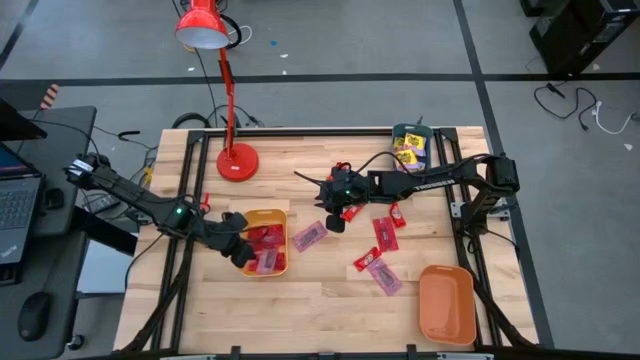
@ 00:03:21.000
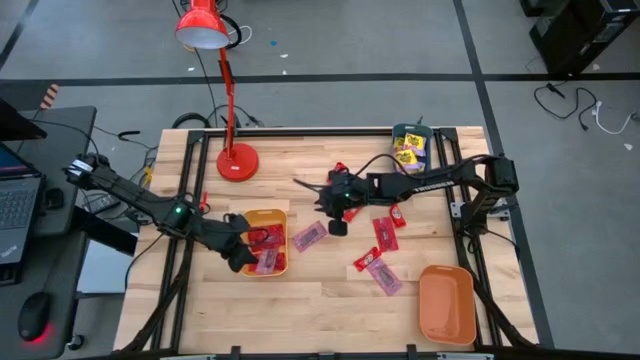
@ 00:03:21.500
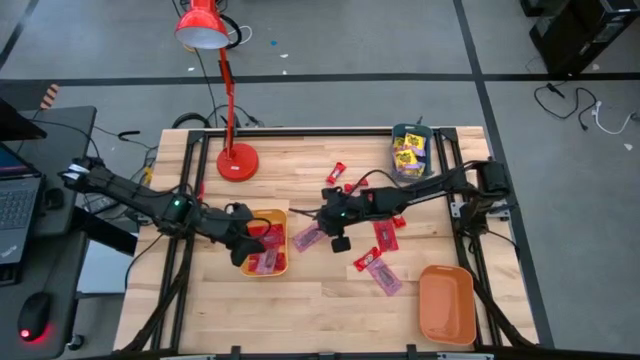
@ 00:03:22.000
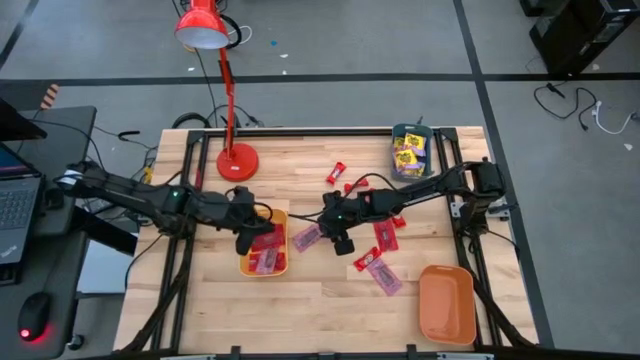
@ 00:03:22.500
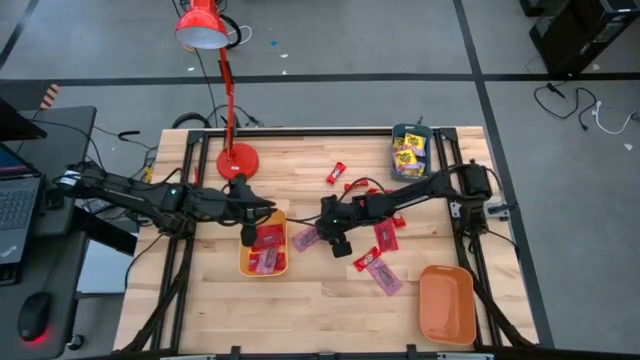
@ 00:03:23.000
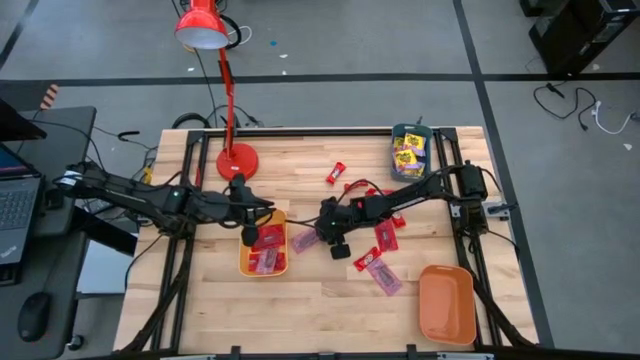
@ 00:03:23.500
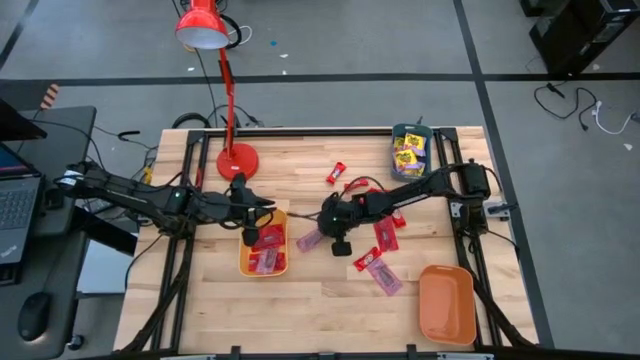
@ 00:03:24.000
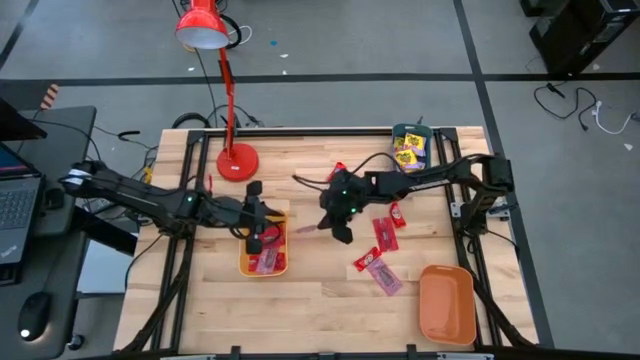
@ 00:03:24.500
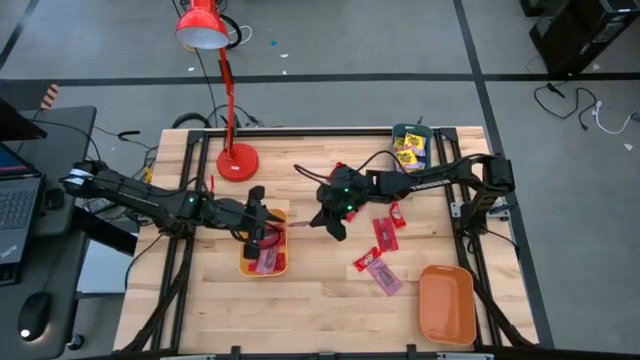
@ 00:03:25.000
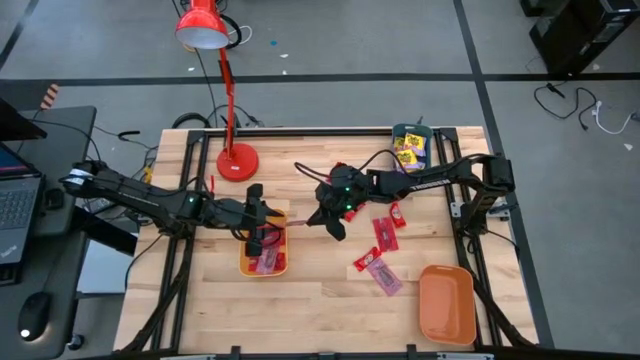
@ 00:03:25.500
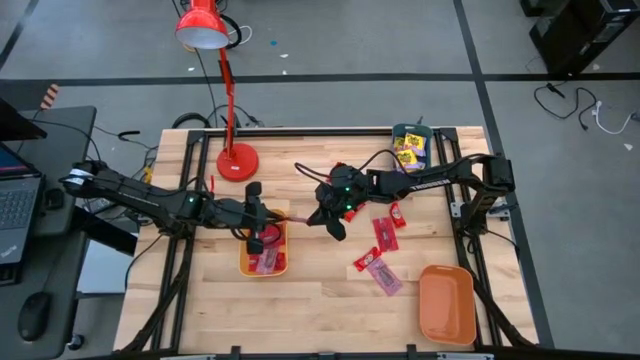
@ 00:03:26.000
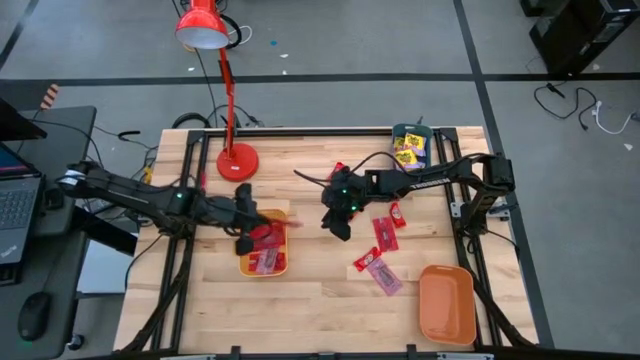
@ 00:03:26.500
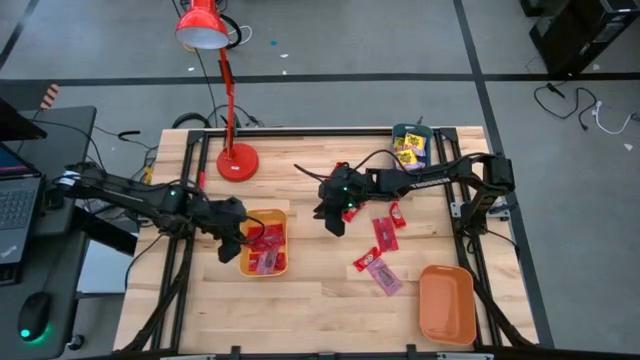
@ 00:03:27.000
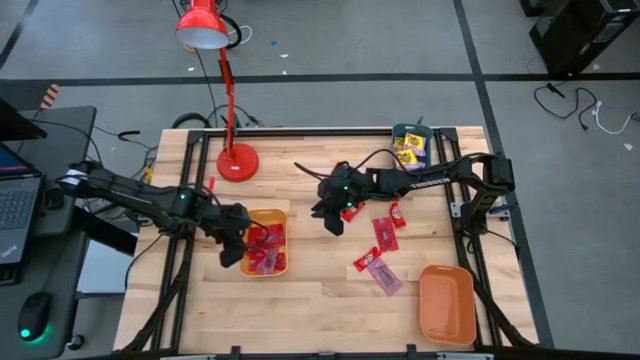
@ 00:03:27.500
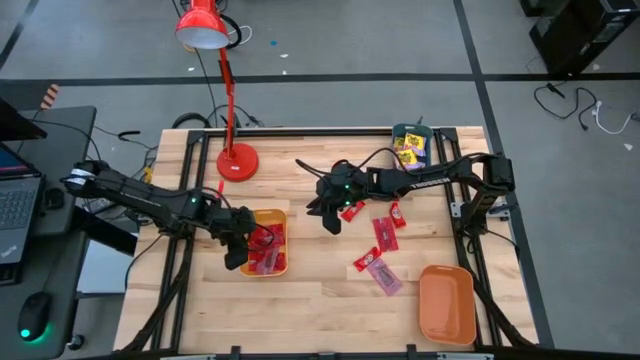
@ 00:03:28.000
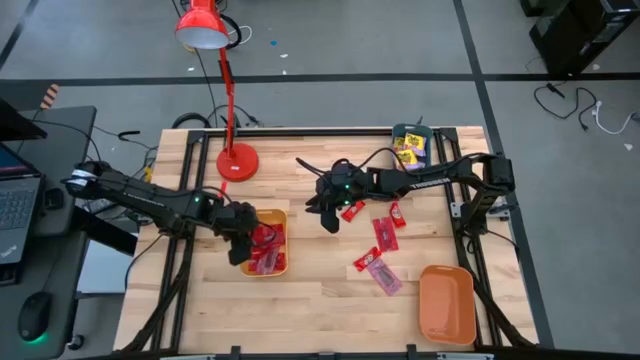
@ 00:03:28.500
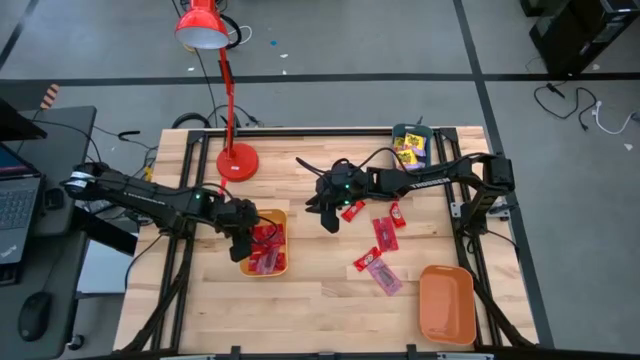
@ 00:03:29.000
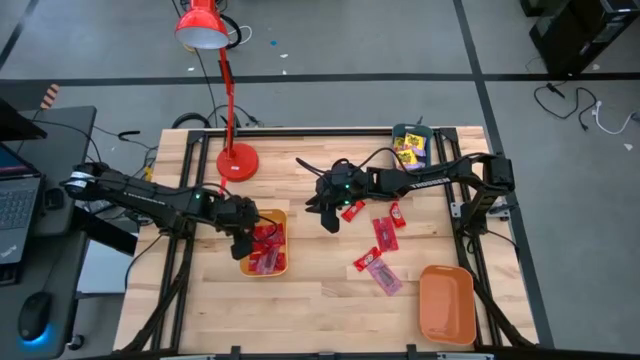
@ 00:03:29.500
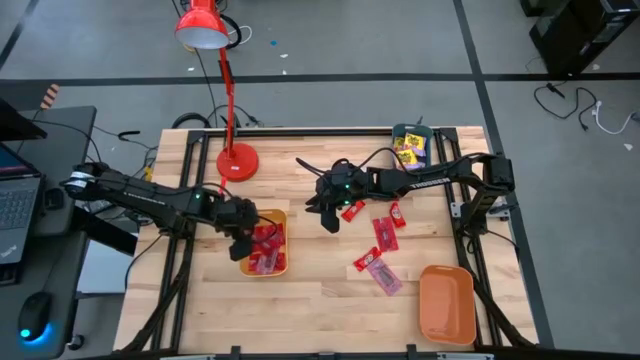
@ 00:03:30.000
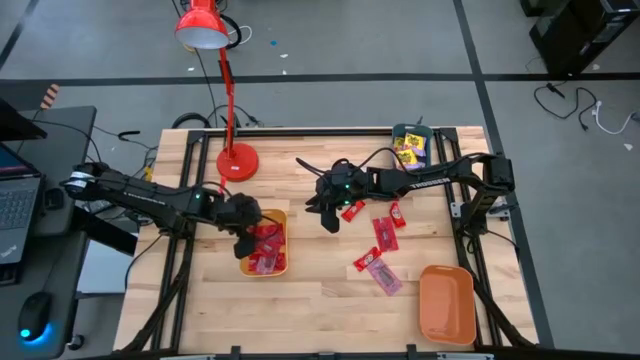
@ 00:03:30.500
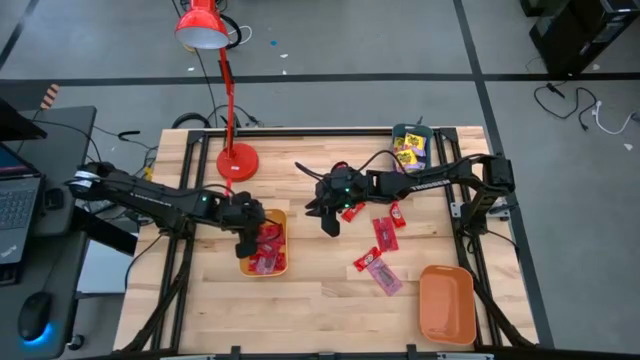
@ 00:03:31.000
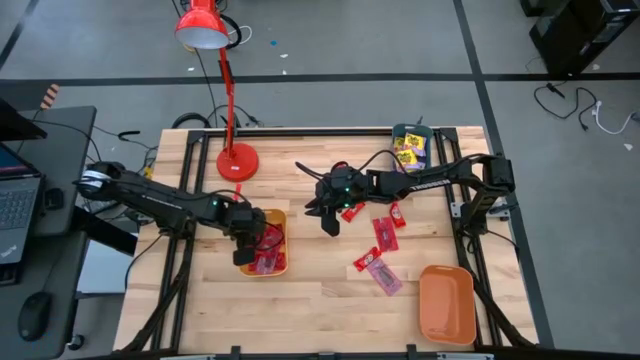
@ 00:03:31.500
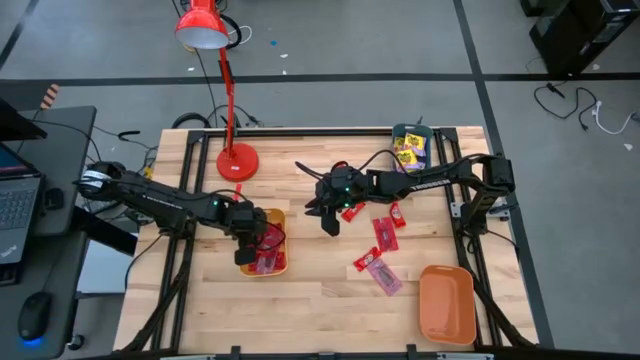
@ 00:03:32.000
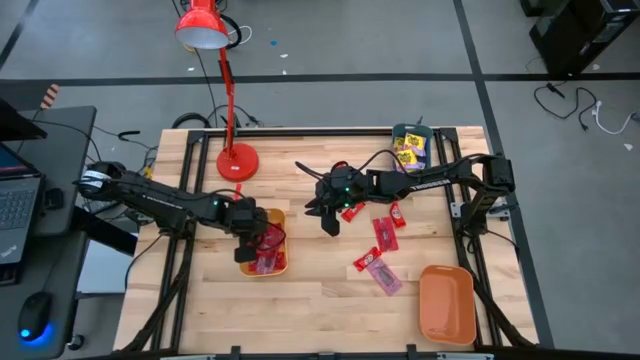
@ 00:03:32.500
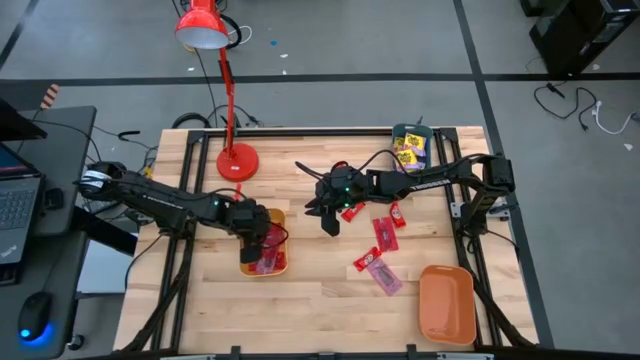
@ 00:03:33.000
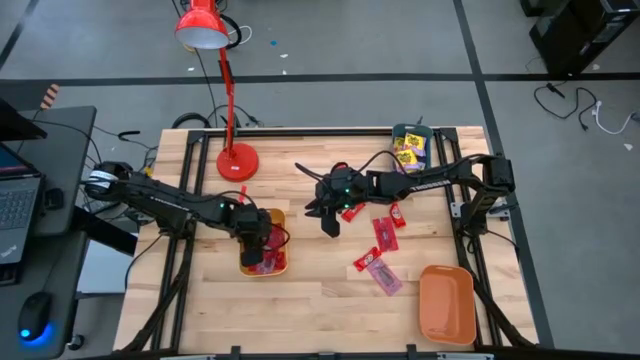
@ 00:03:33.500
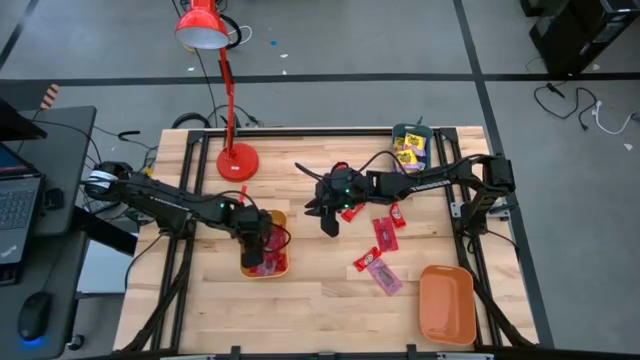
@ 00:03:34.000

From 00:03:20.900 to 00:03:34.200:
Task: Sort candy
Put the red candy pack into the yellow bin

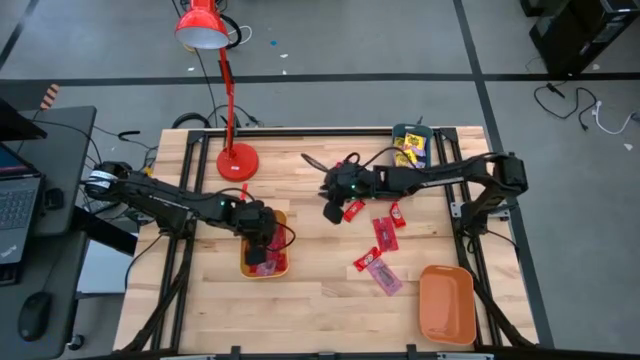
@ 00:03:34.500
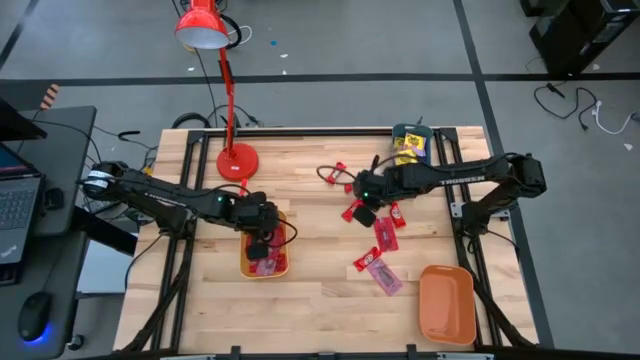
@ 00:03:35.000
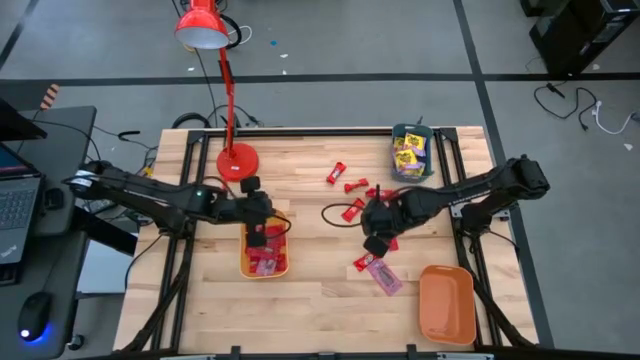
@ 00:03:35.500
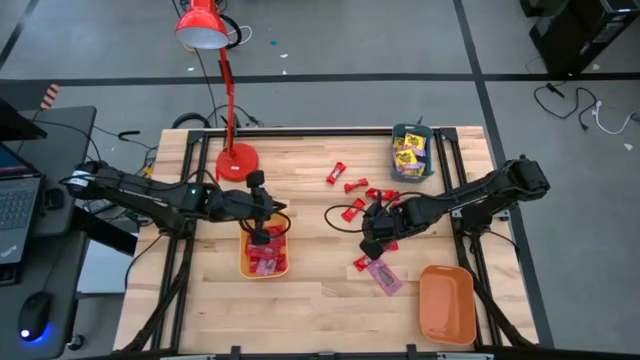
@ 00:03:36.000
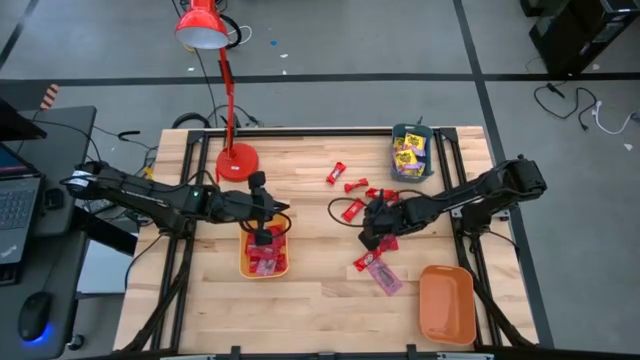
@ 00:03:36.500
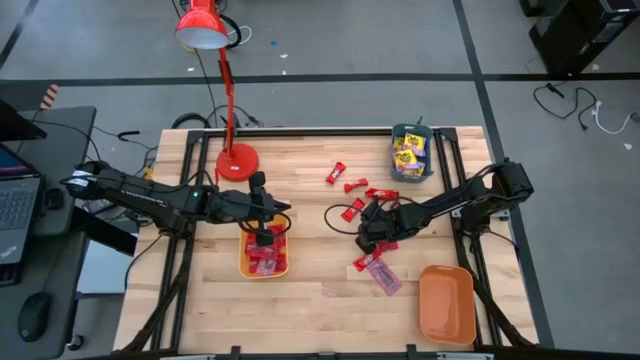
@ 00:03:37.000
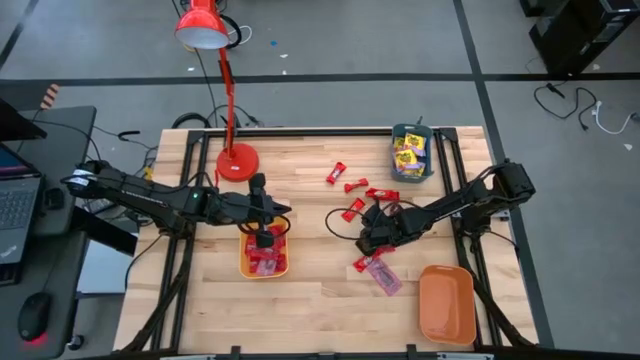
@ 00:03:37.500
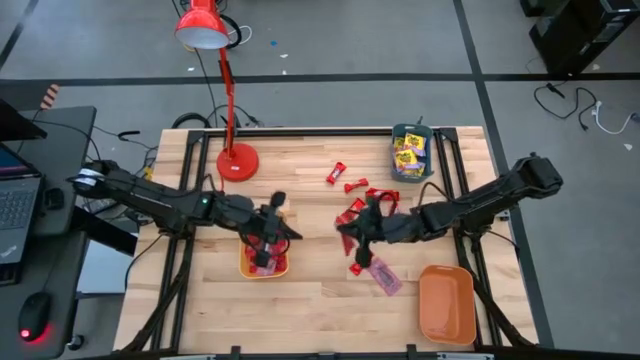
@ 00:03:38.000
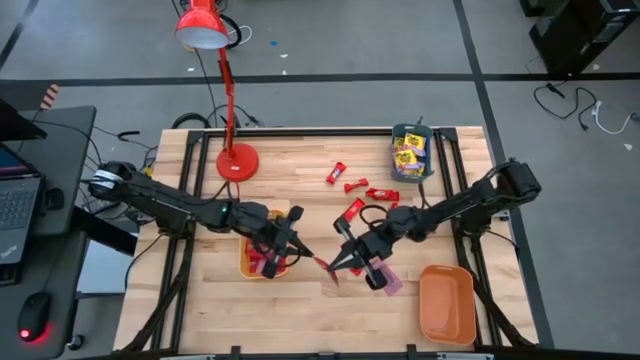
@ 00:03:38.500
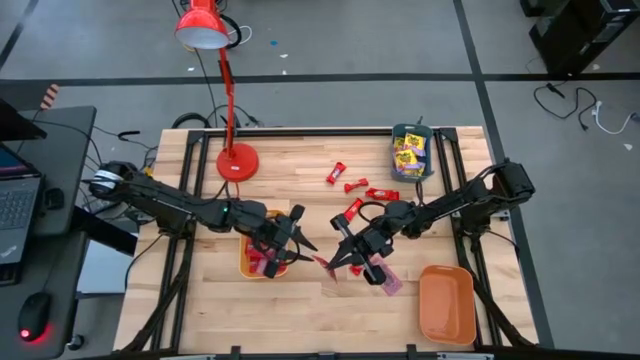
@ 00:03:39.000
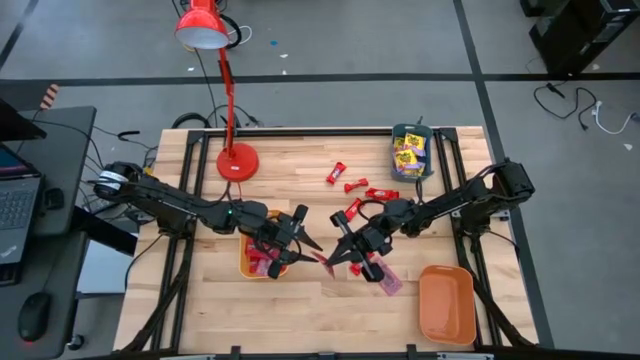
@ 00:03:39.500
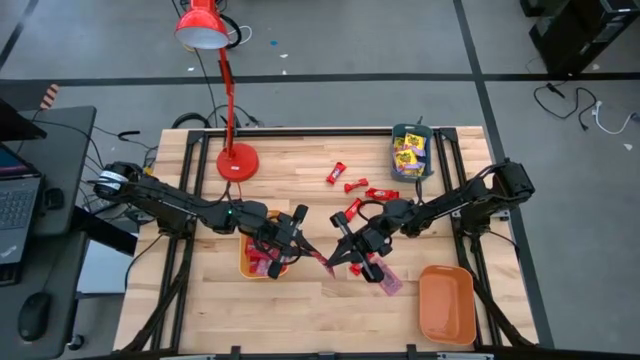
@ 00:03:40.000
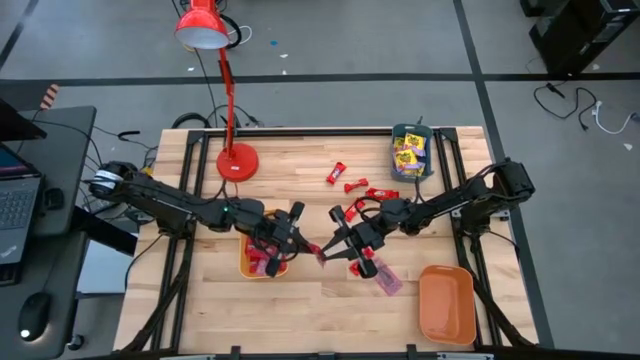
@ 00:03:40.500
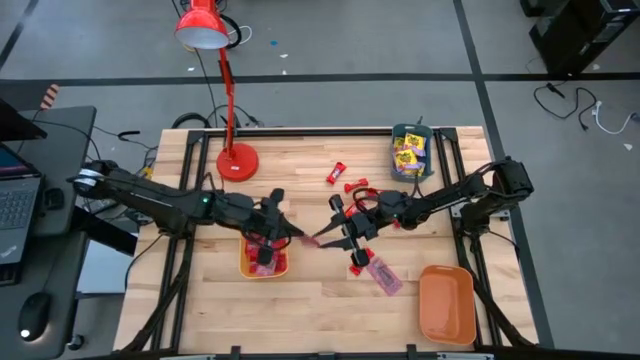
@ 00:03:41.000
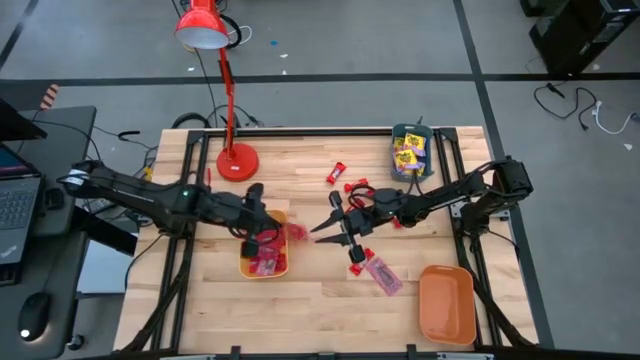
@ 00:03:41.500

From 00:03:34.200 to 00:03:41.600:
Put the red candy pack into the yellow bin
